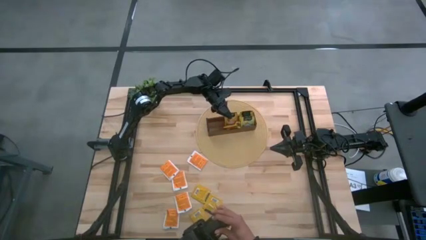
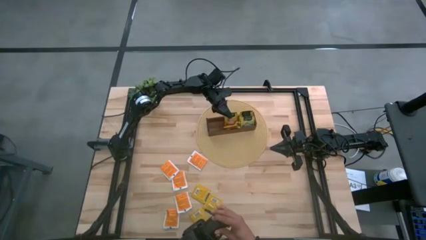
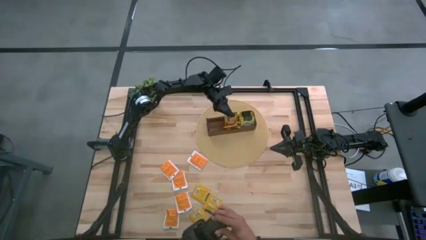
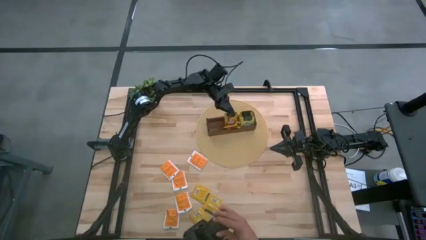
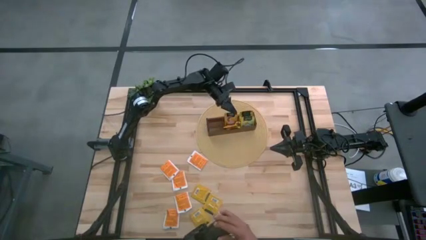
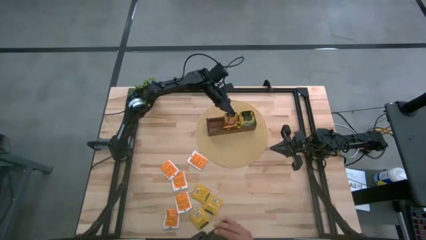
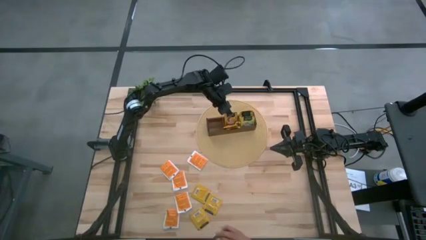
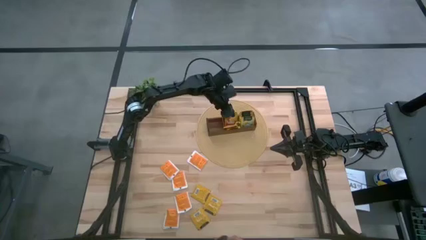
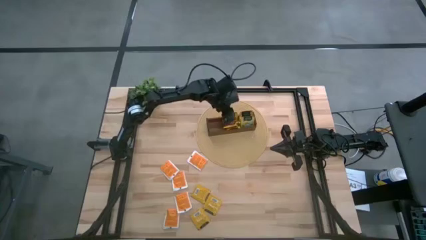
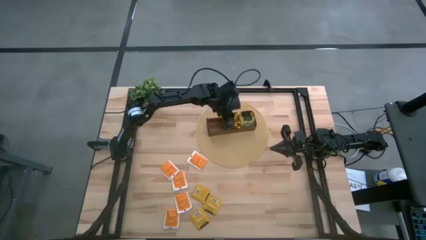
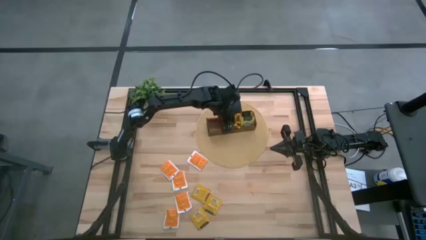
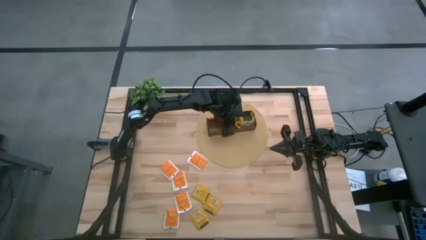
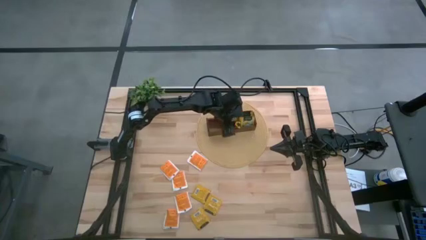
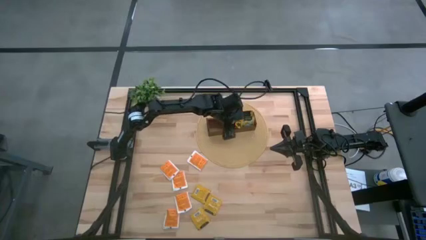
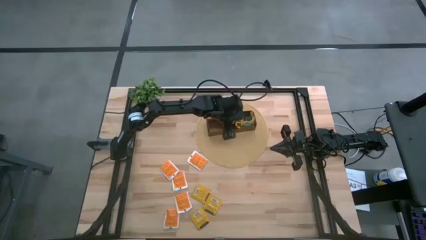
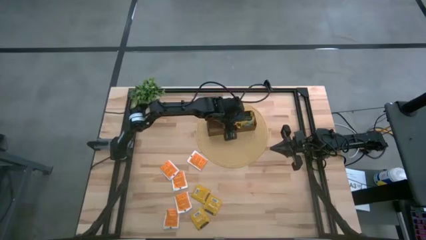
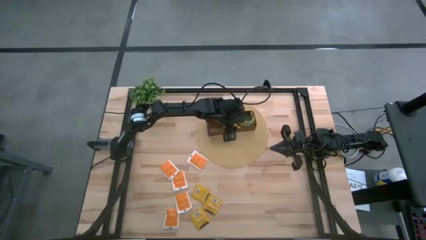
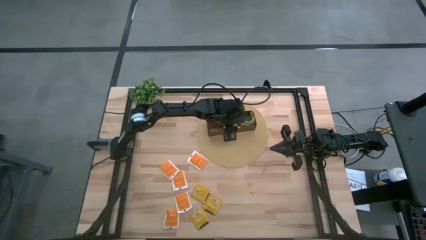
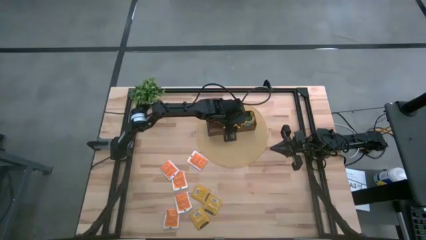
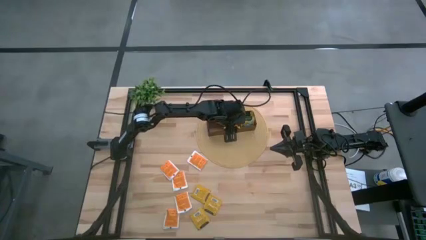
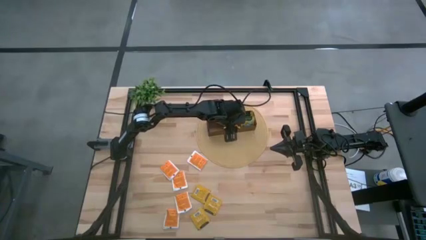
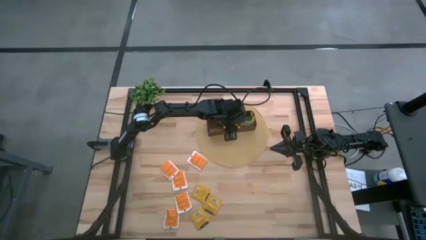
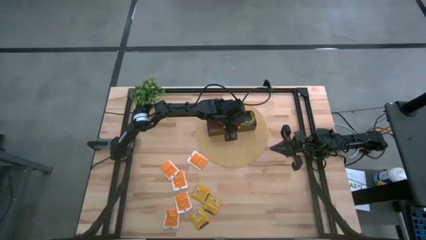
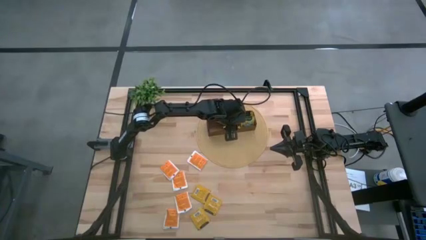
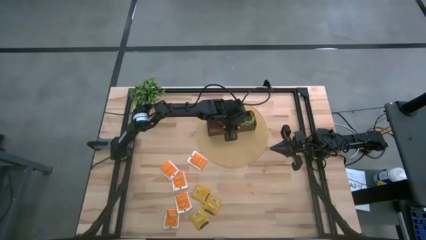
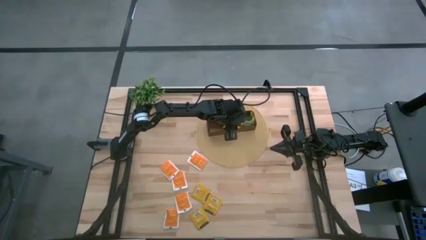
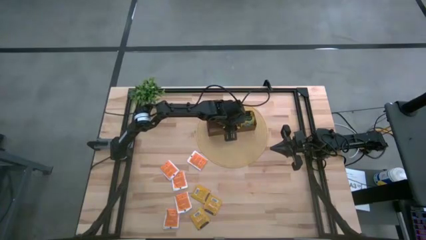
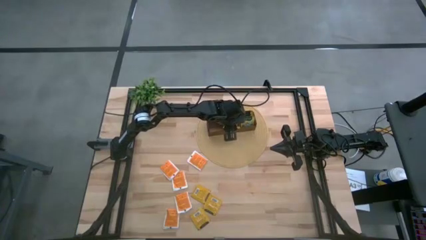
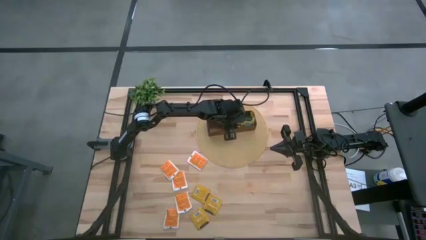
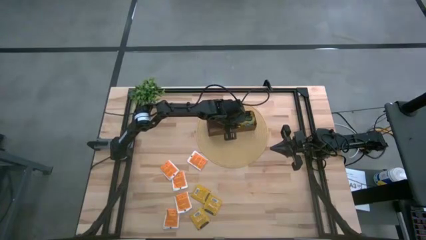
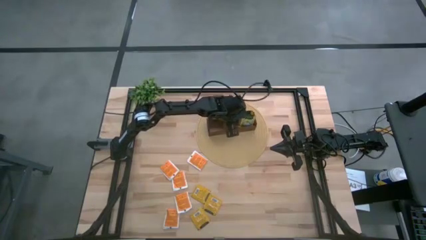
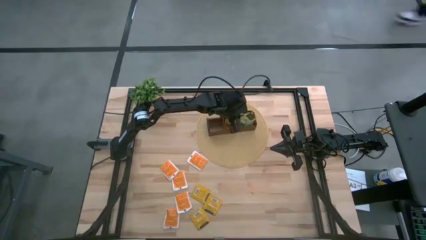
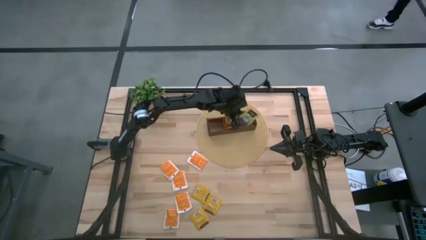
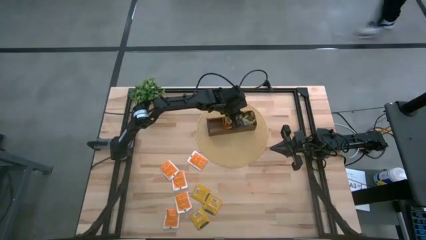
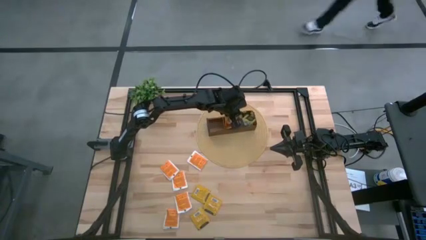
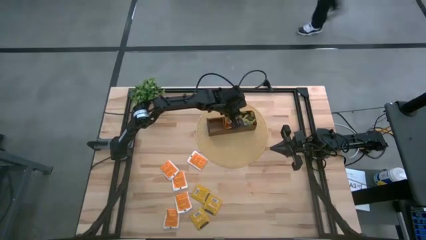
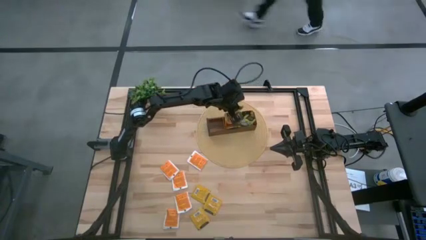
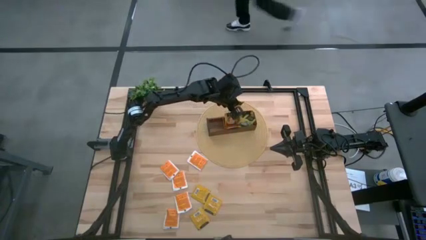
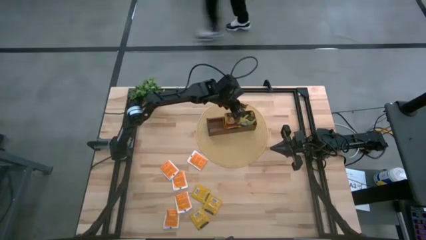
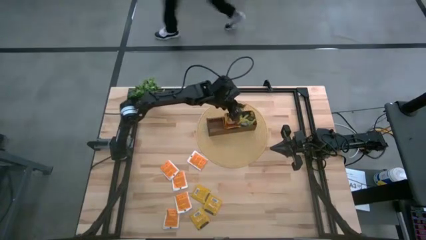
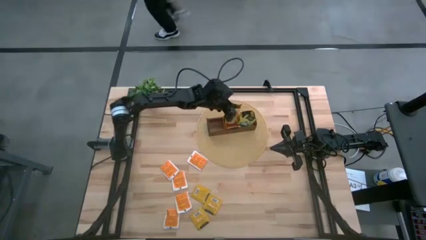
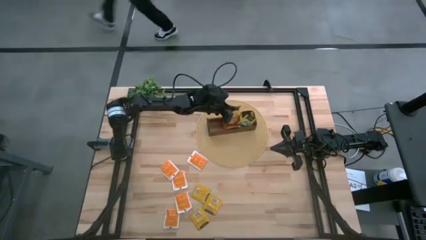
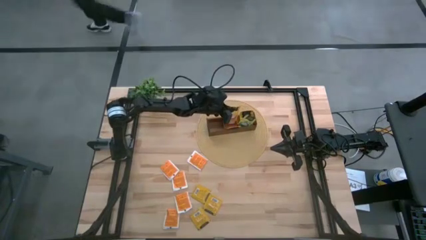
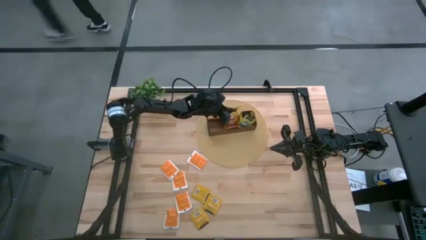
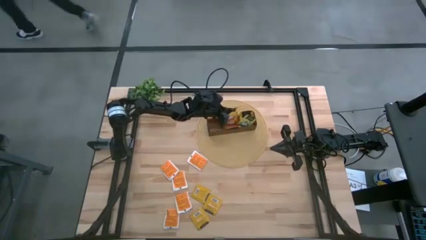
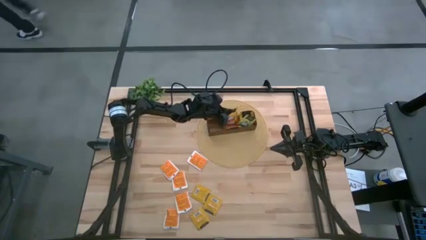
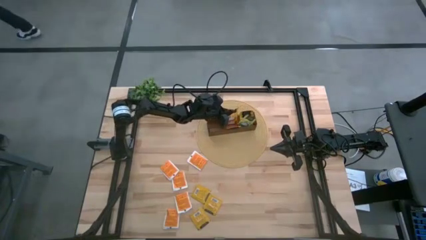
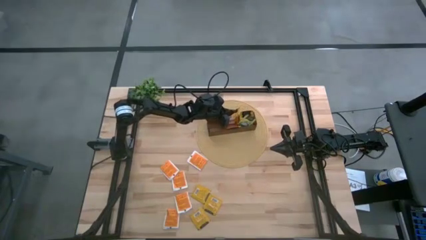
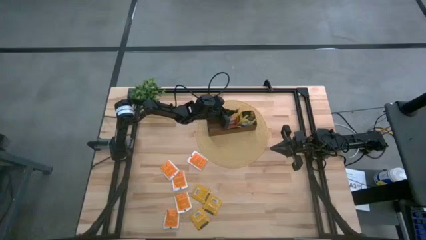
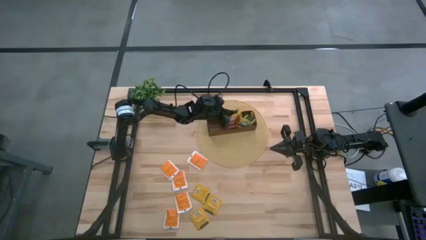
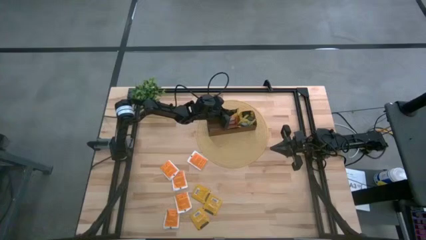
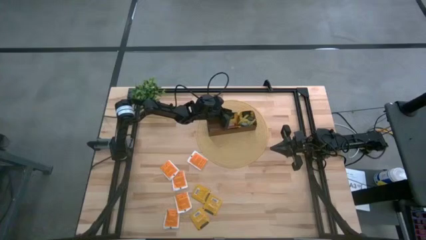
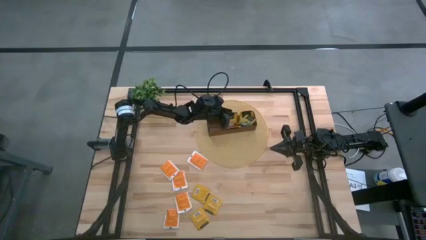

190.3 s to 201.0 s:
Task: Pick & Place Tea
Put the orange tea bag into the middle section of the wooden organizer

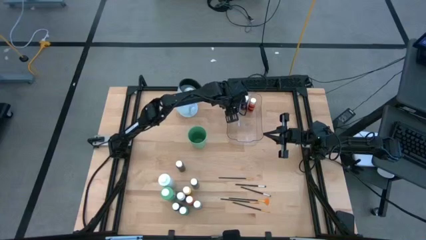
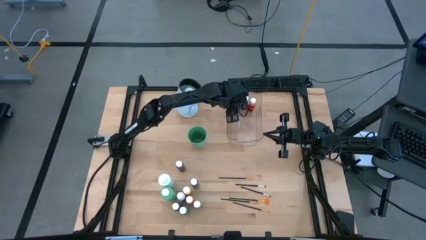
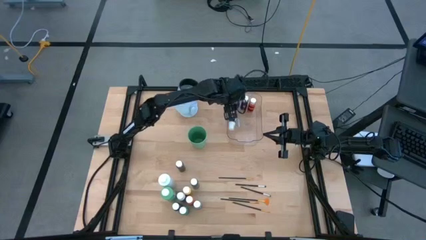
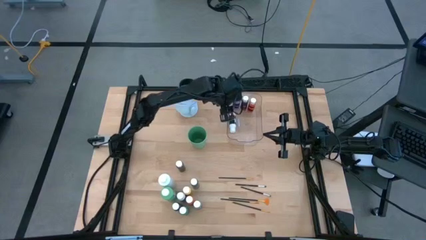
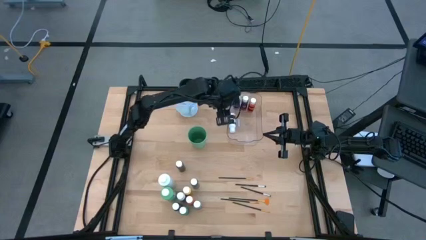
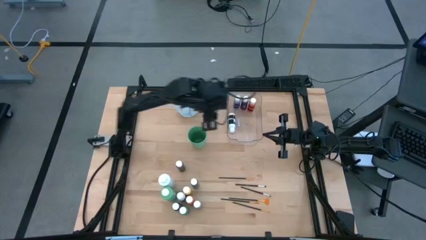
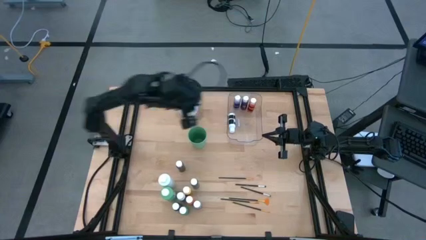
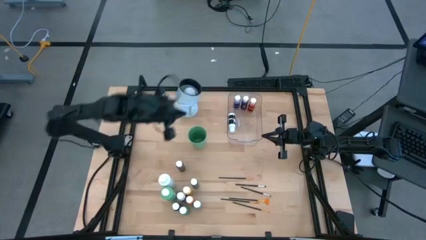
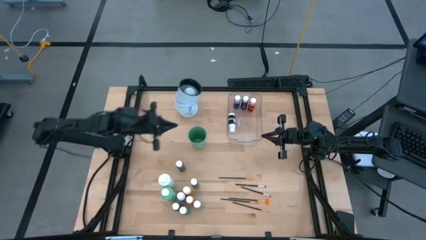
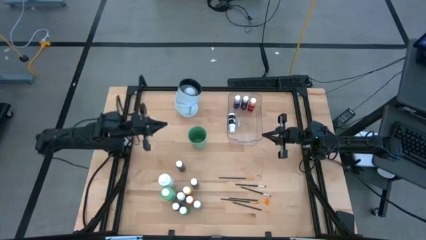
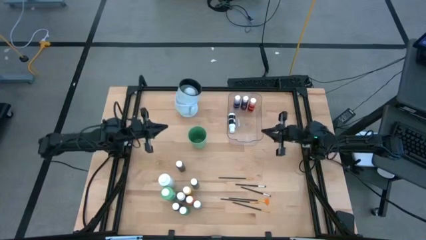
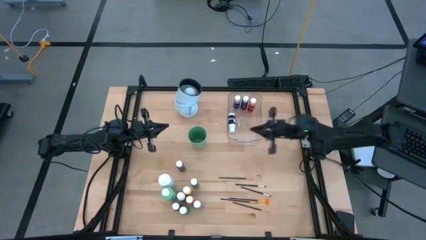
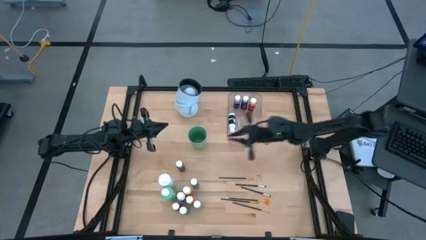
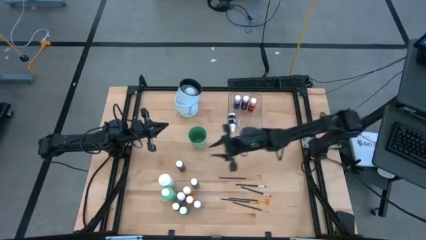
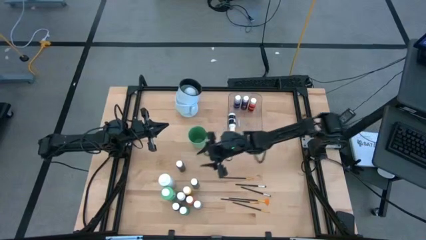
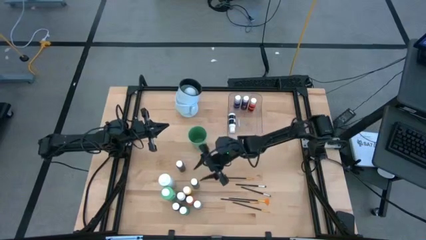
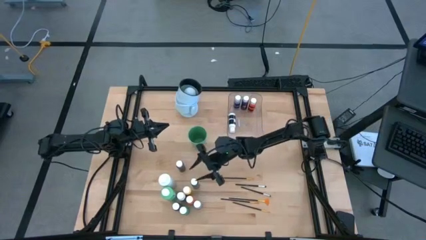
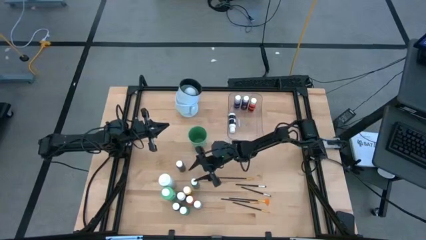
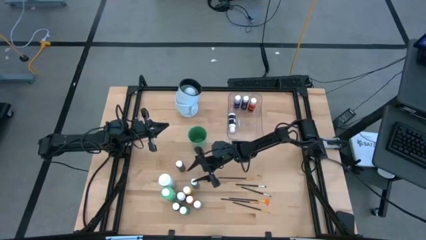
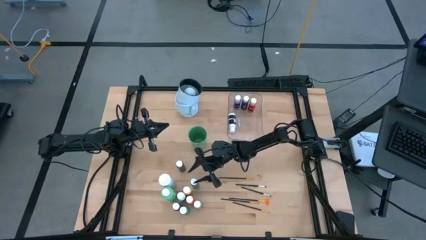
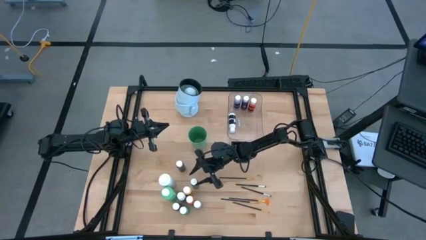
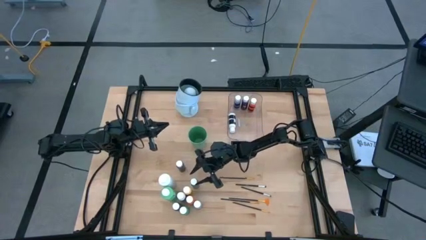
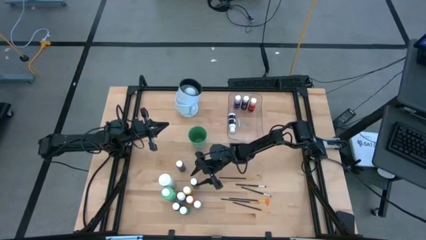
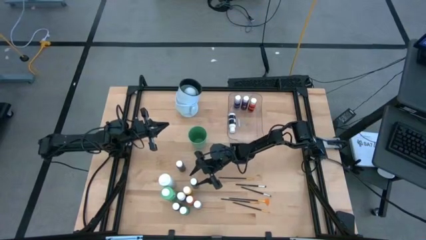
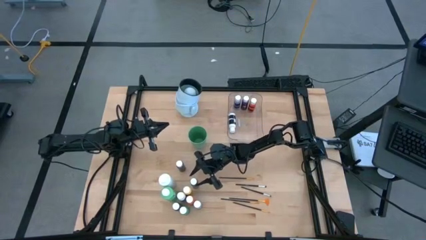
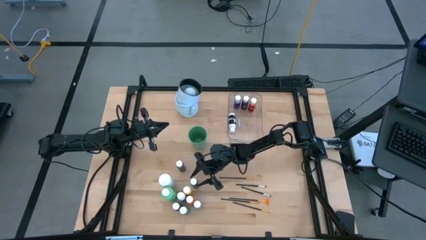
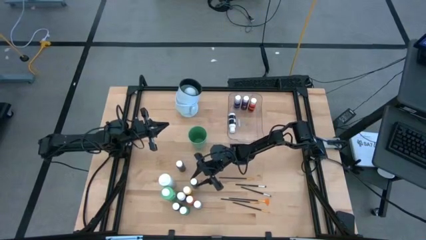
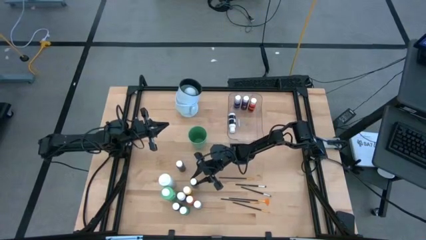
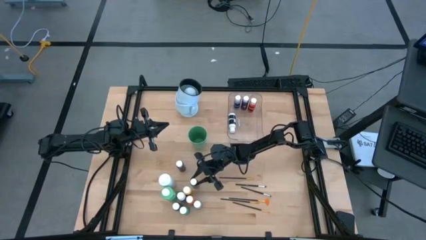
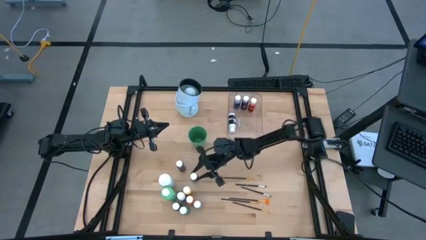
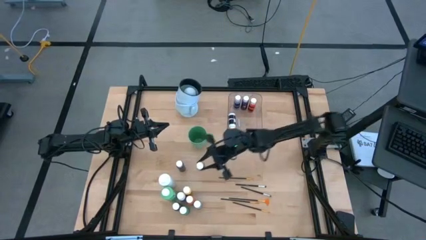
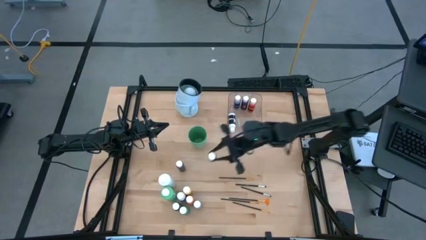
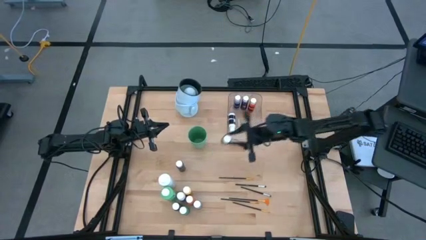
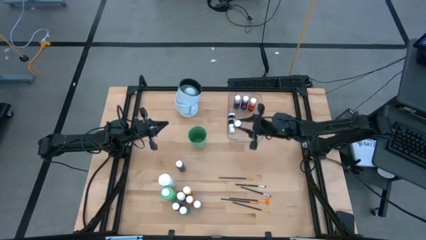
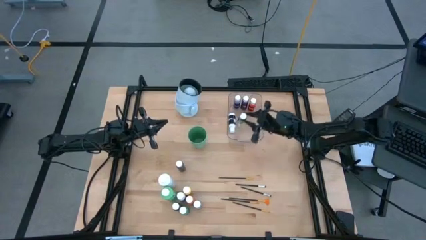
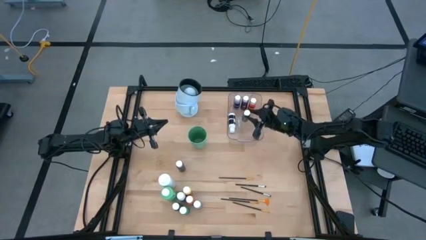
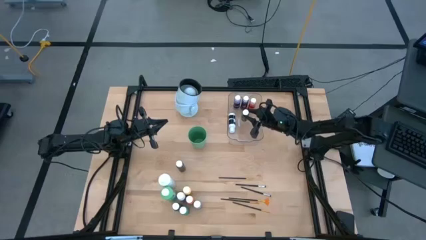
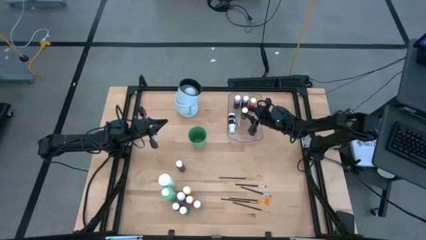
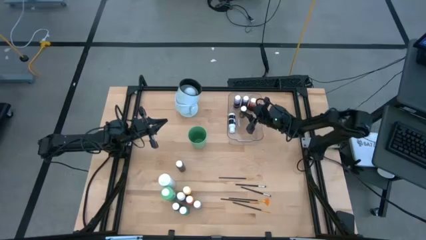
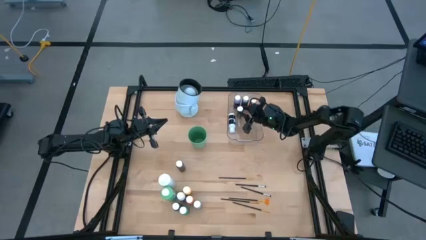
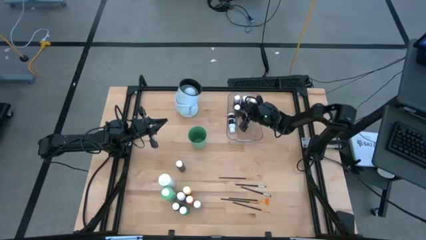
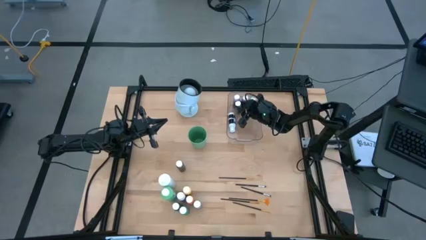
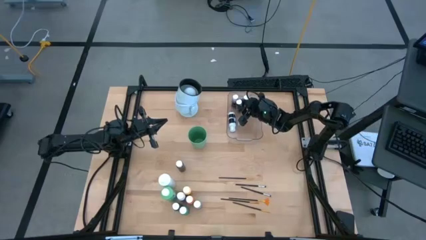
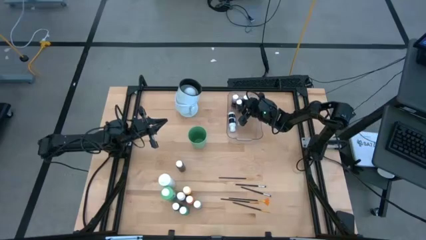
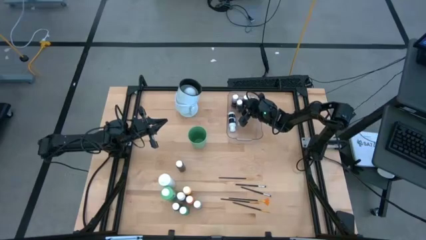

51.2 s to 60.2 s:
Task: Pick & Place Paint Supplies
Put the top green paint bottle into the transparent bin
